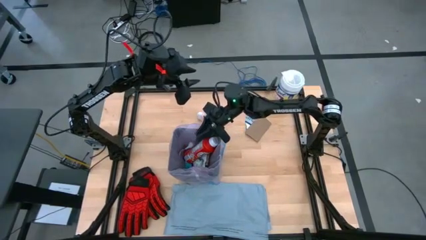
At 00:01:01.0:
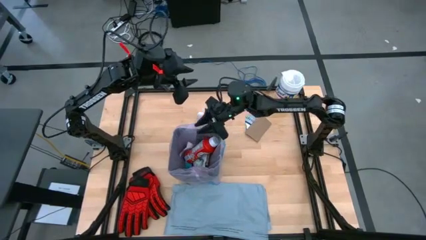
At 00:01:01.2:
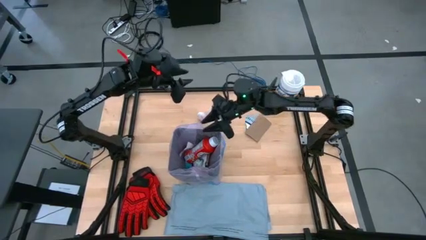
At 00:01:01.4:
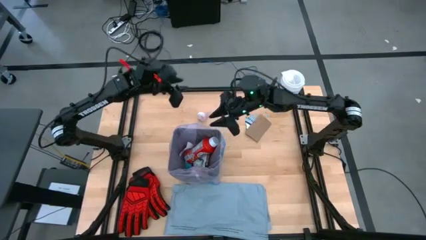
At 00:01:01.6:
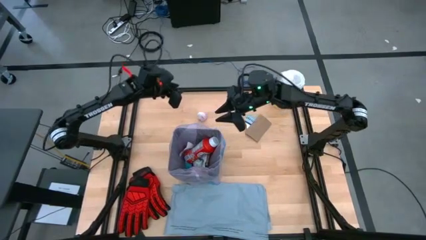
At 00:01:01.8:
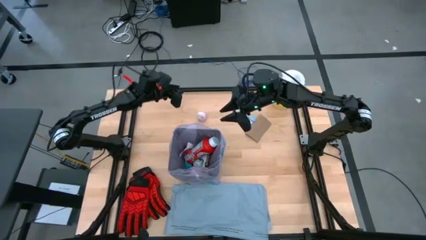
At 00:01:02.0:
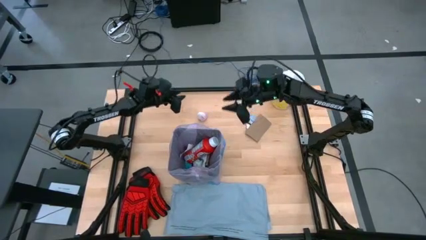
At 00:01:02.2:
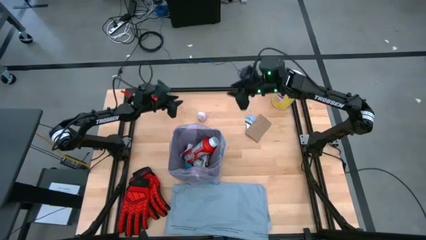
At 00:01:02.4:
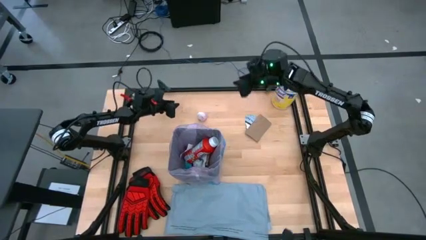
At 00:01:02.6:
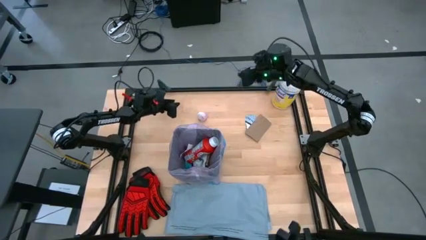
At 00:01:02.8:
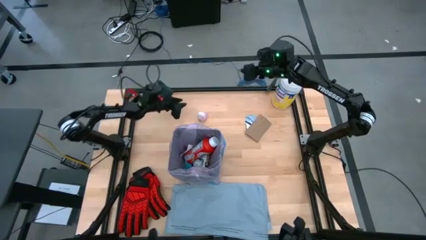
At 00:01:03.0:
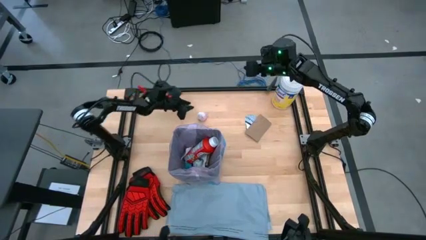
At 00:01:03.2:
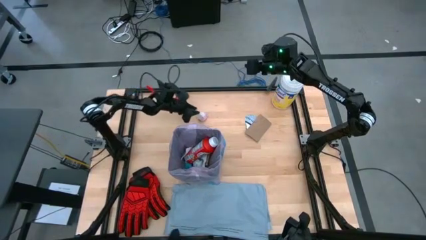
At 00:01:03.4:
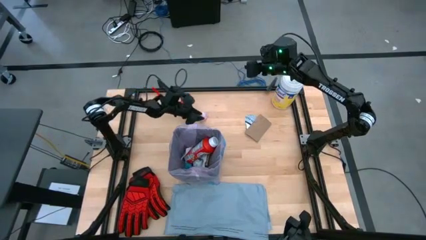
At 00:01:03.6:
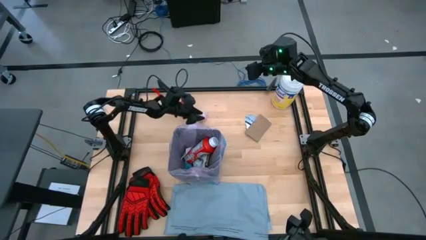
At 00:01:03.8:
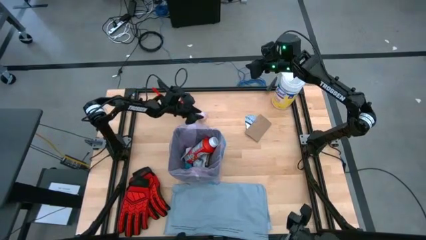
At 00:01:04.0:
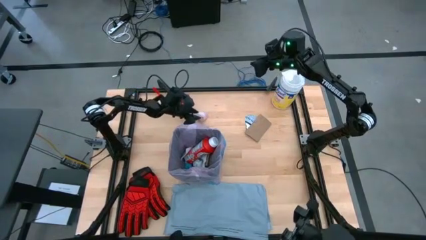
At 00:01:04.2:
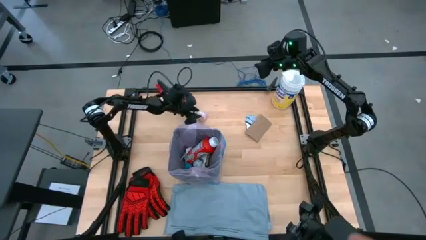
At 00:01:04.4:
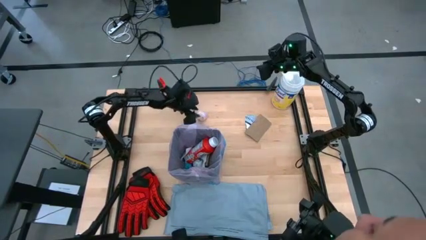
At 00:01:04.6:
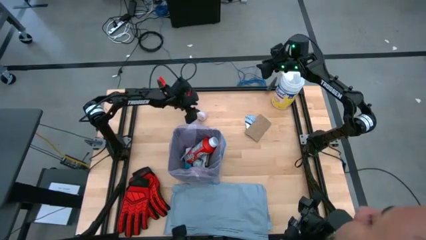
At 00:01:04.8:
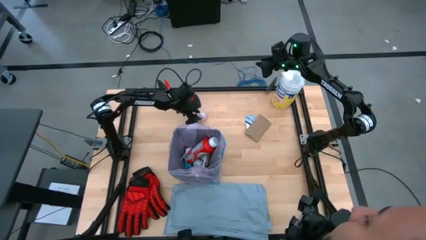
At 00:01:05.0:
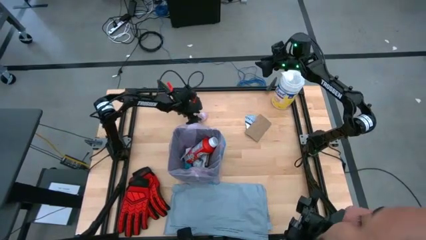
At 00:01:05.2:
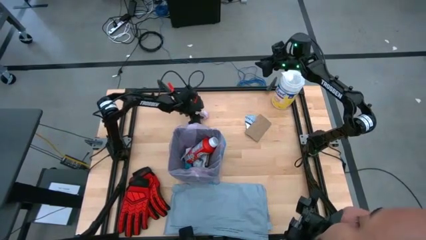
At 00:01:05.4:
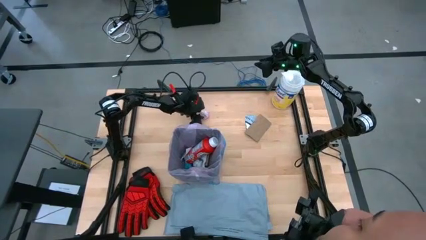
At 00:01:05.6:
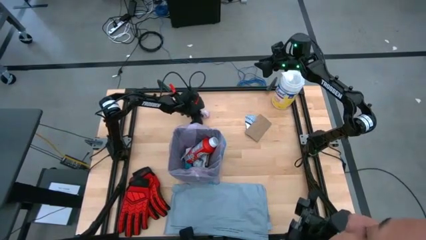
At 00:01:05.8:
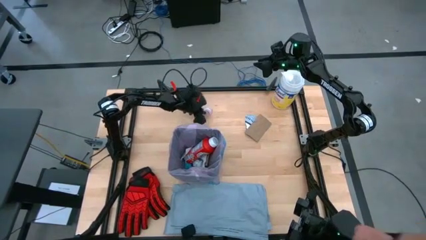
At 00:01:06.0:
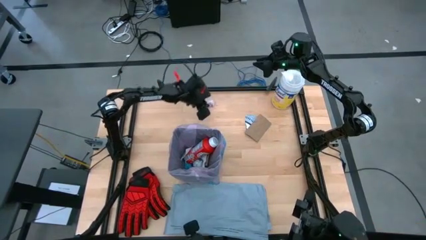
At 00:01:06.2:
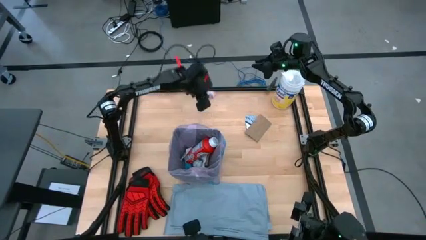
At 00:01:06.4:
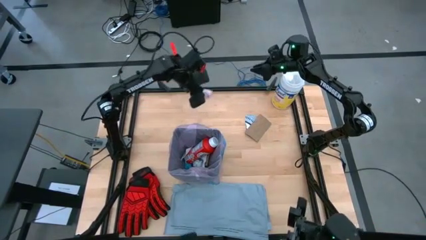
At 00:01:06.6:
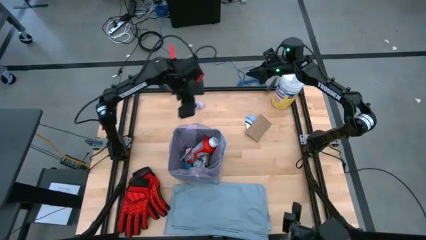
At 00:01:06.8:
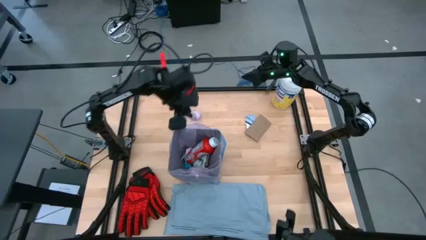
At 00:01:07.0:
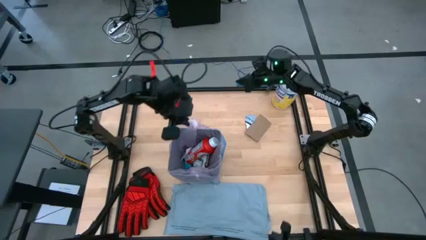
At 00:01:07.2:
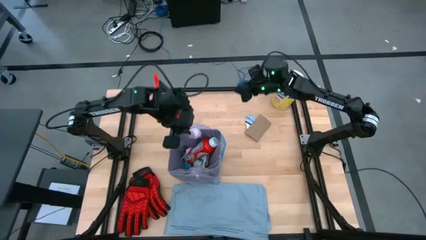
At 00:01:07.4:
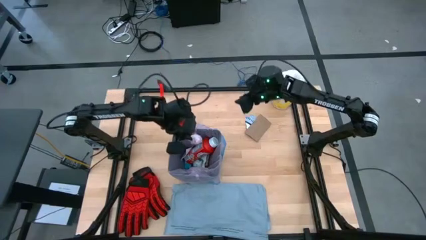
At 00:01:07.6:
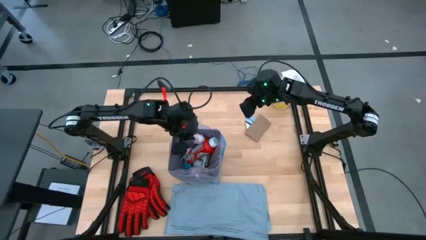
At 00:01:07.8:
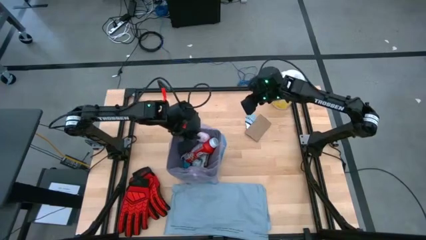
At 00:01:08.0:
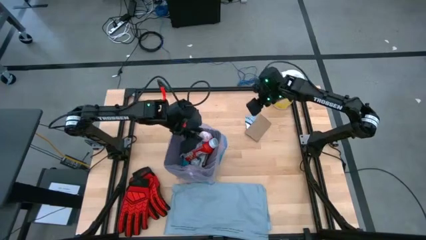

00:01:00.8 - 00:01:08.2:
Task: place trash/remove bag and relplace
Put the pink plastic material into the trash bin

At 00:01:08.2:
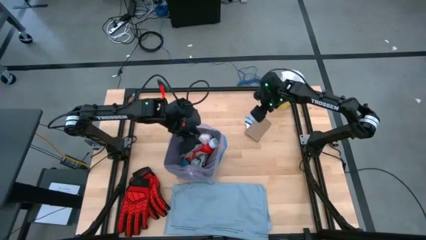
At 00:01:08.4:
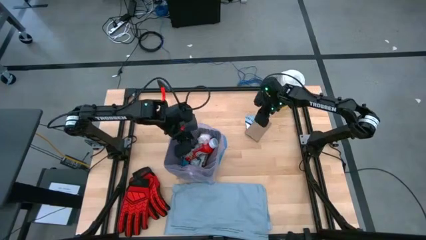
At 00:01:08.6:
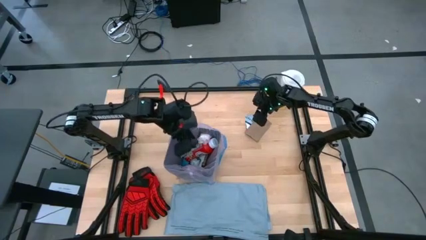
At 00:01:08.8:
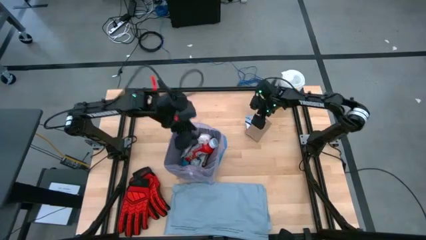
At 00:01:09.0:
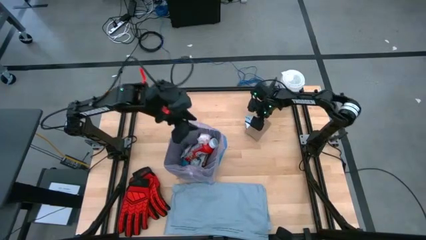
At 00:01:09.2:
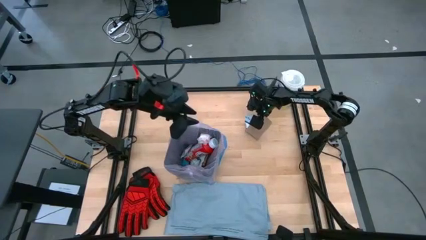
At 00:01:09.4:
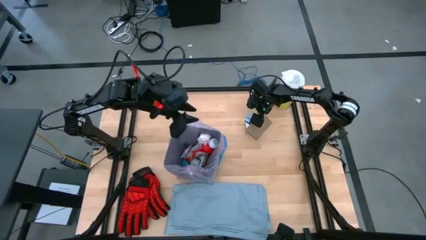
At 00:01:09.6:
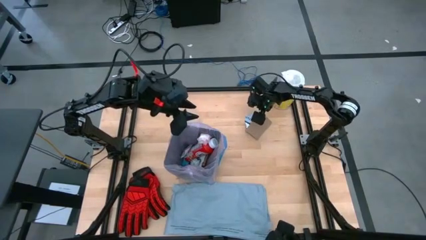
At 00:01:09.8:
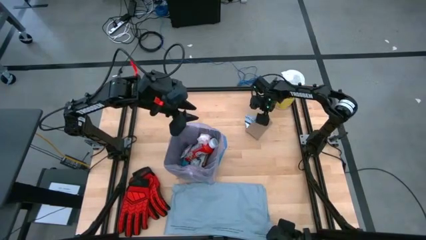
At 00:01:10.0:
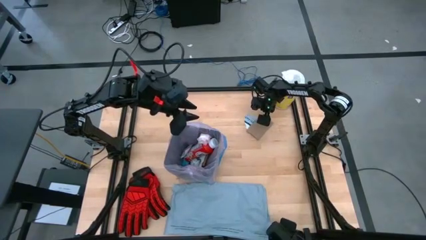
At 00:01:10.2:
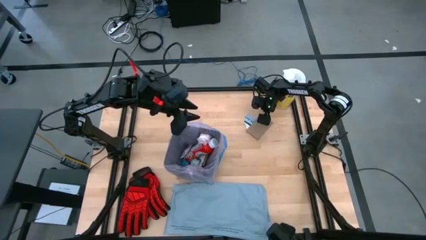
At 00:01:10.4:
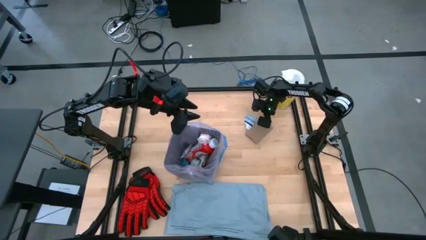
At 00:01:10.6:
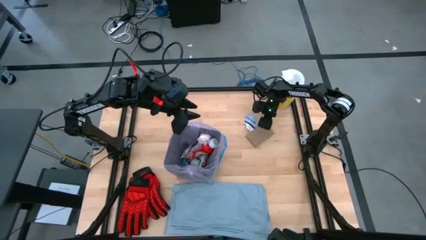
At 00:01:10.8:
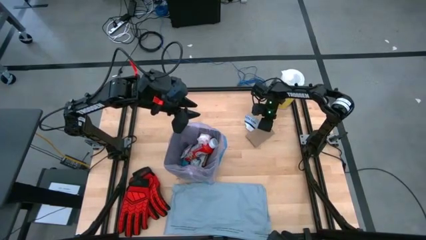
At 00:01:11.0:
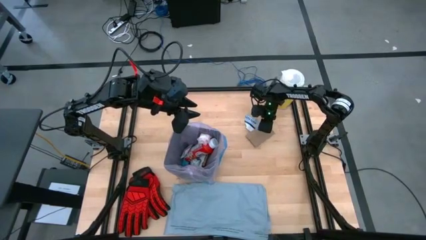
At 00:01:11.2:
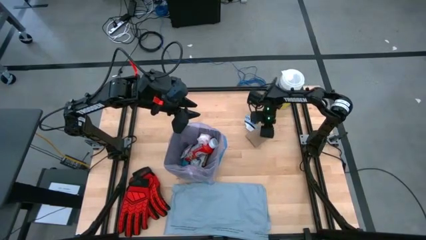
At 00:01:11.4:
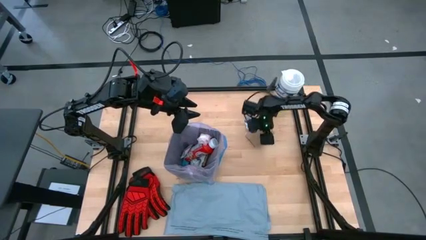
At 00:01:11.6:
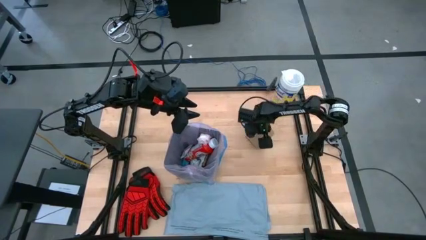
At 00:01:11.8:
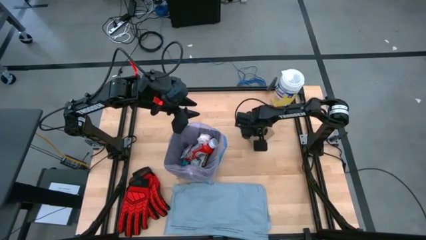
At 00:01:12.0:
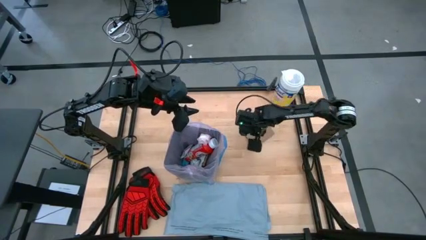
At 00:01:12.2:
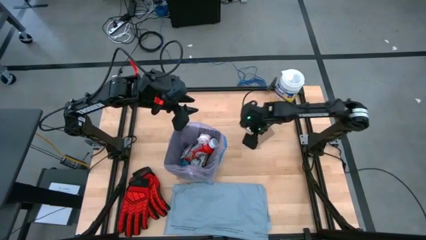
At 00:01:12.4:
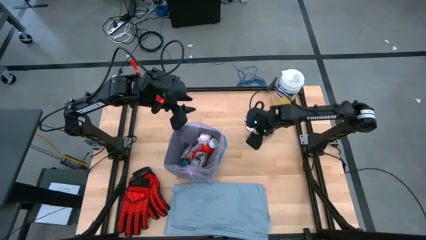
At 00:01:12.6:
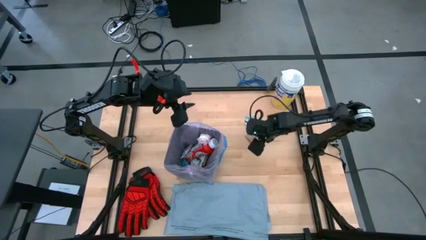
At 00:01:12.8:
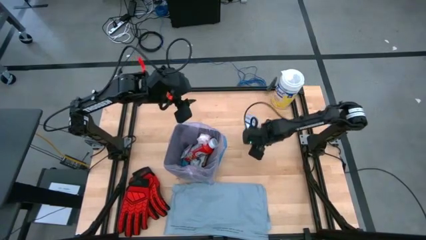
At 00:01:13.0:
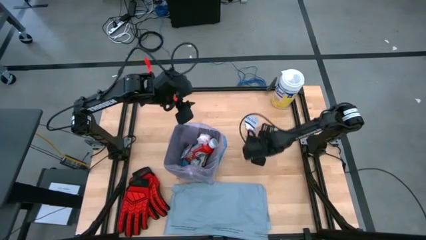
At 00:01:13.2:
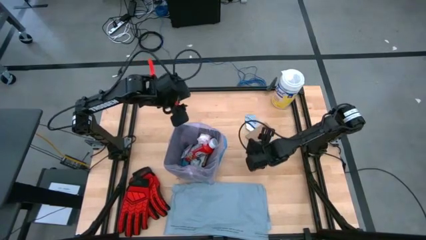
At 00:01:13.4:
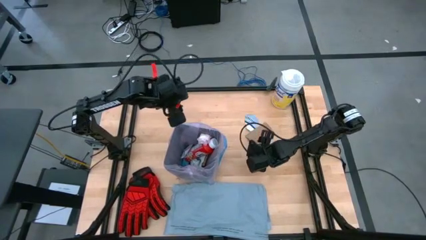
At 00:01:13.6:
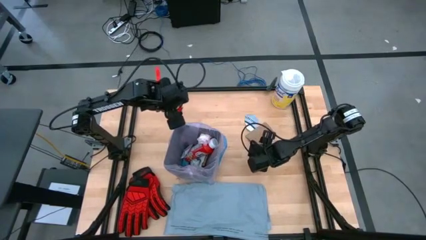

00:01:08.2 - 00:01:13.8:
Put the brown cardboard into the trash bin

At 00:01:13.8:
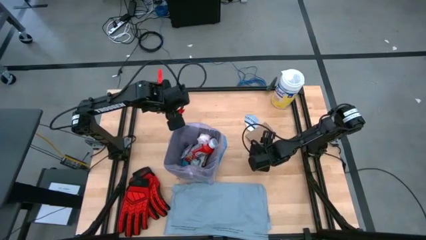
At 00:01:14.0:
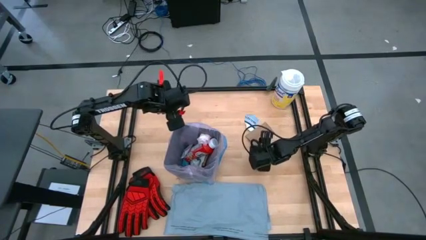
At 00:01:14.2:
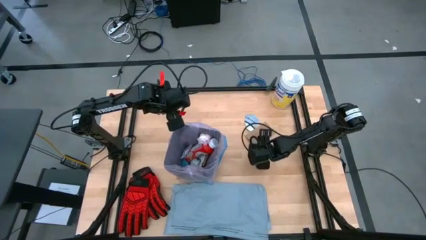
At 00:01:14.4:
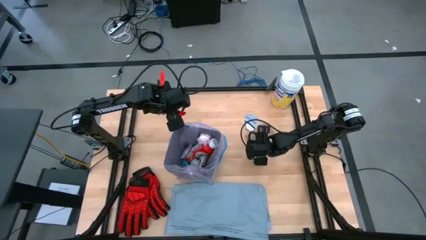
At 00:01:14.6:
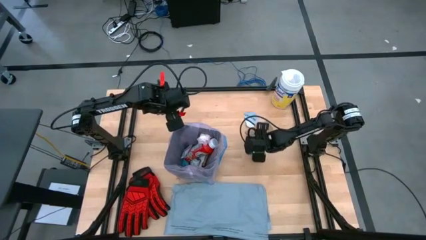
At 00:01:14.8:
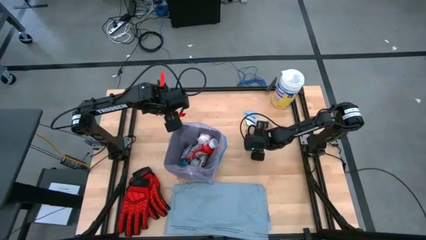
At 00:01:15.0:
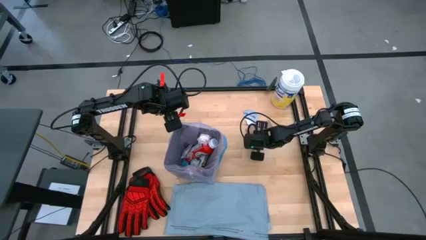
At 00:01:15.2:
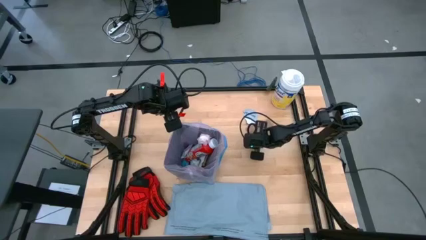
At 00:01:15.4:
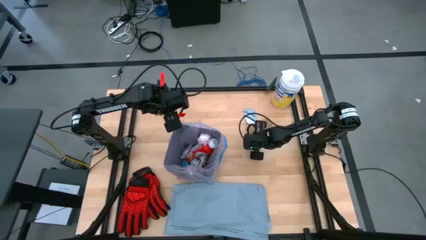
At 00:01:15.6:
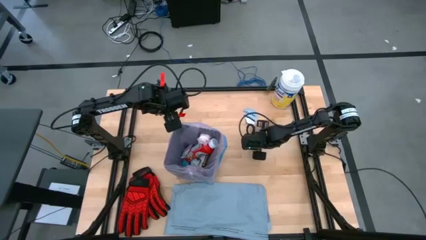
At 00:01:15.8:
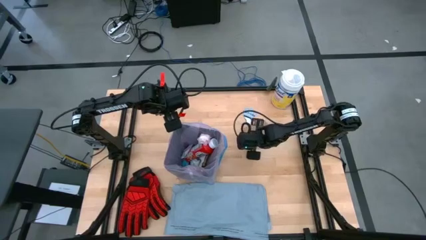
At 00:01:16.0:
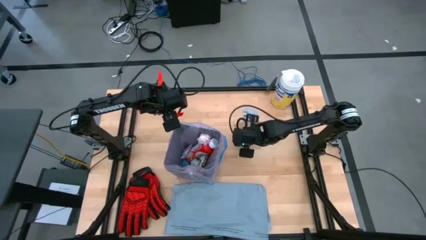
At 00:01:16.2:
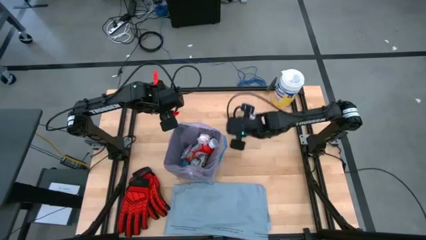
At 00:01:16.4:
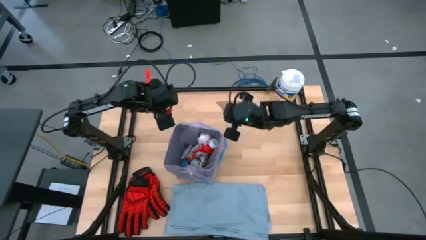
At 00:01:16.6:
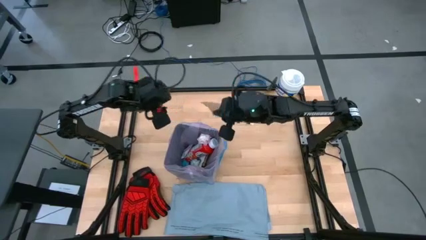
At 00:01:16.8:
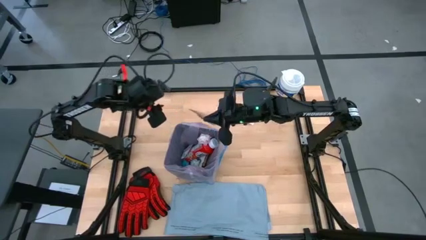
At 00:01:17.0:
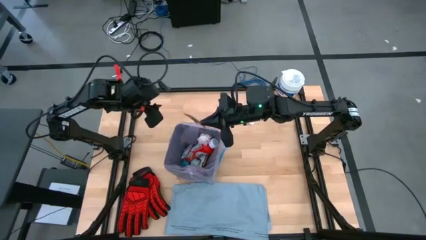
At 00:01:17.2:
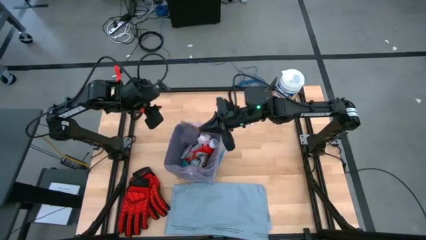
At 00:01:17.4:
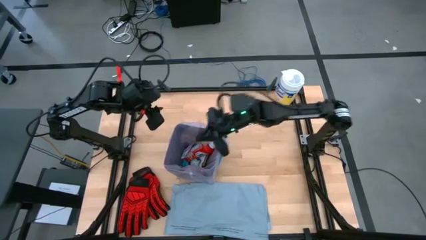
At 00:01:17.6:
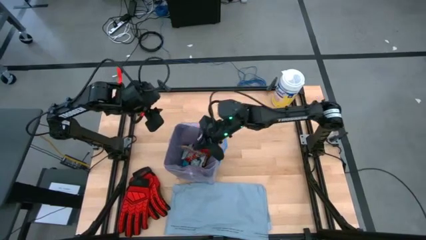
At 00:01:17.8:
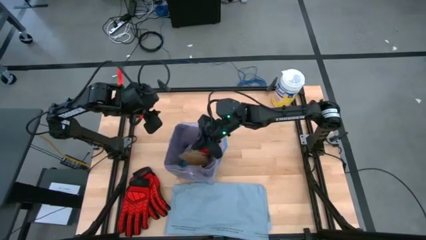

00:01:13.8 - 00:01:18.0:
Put the brown cardboard into the trash bin
